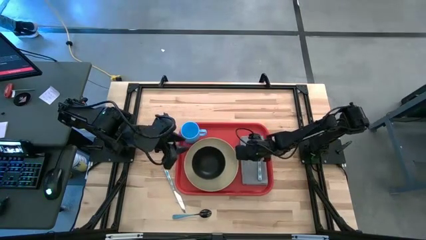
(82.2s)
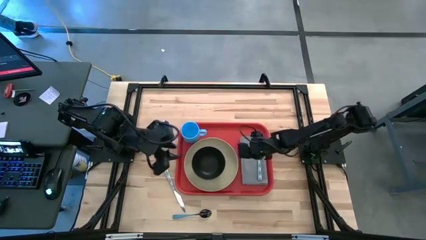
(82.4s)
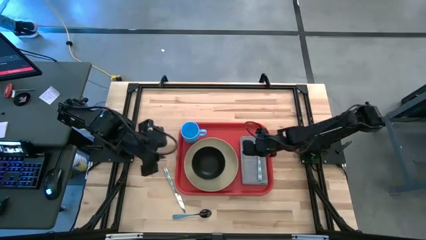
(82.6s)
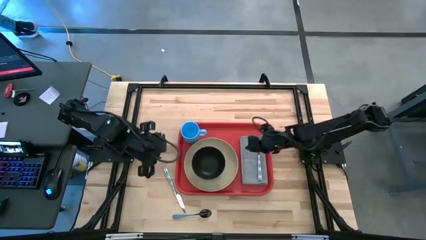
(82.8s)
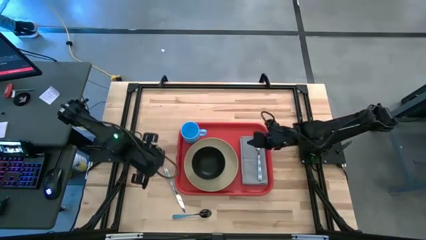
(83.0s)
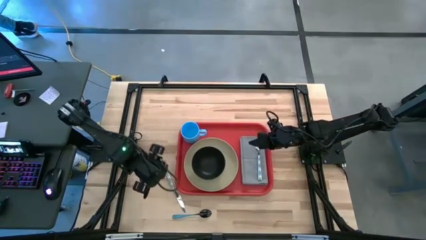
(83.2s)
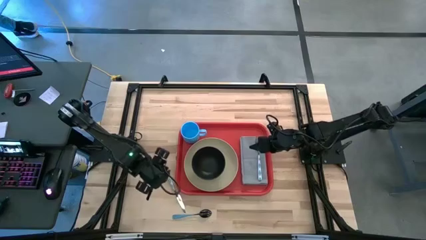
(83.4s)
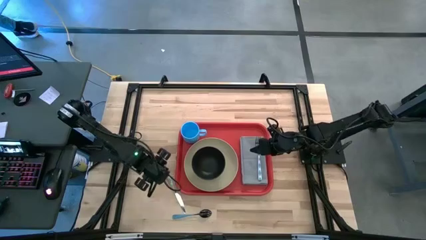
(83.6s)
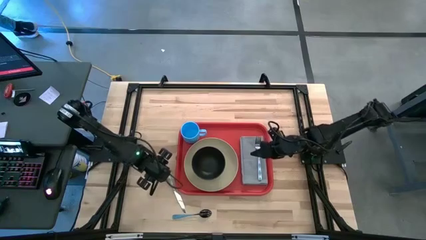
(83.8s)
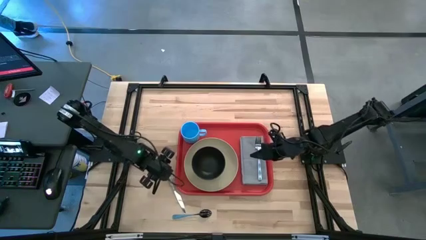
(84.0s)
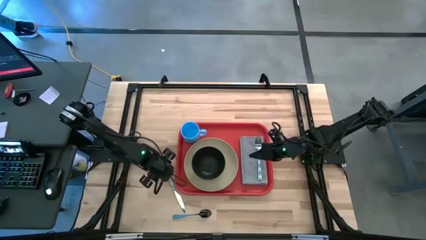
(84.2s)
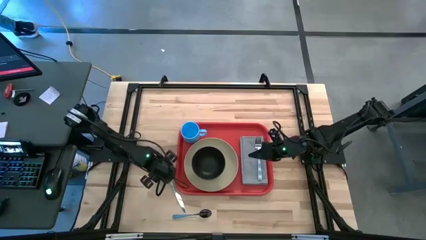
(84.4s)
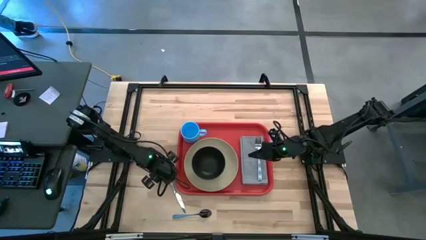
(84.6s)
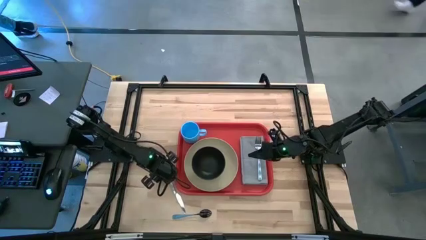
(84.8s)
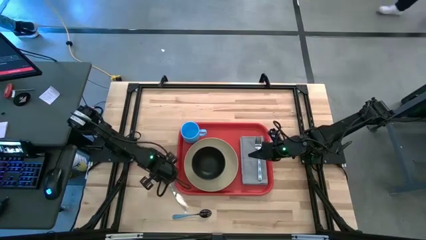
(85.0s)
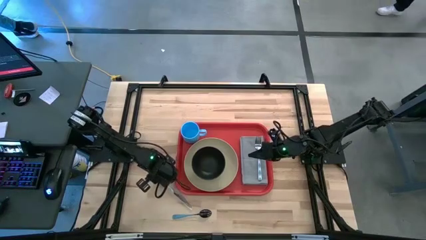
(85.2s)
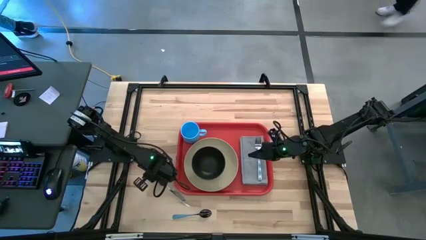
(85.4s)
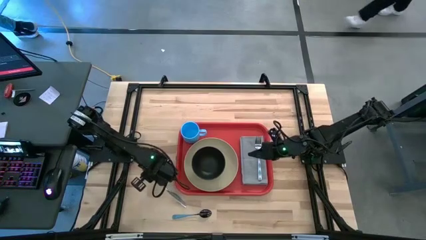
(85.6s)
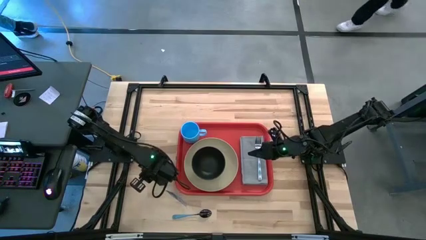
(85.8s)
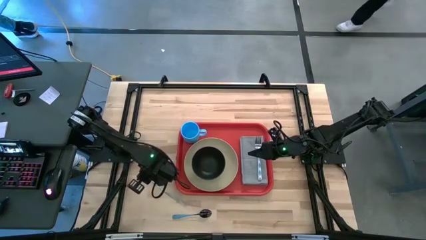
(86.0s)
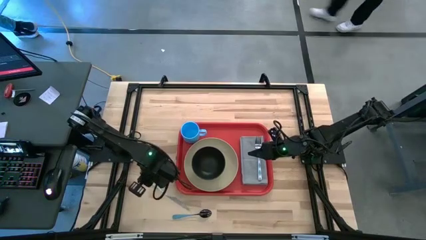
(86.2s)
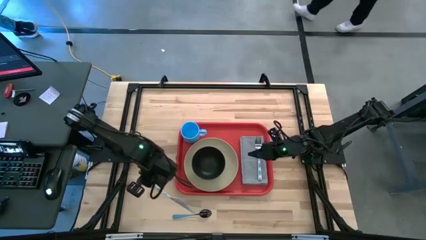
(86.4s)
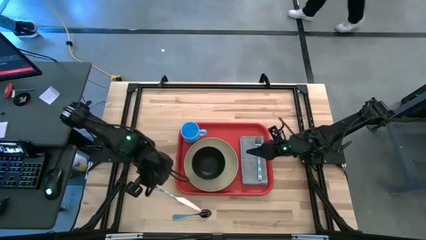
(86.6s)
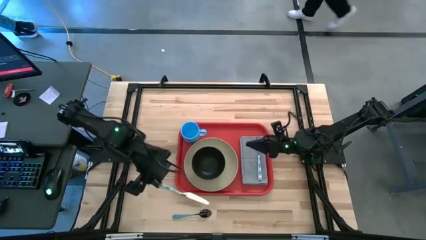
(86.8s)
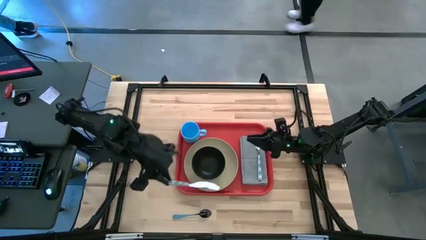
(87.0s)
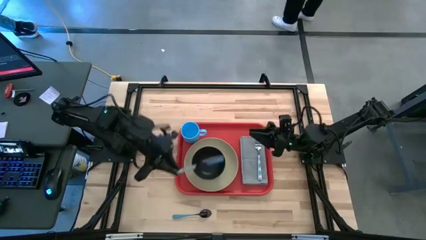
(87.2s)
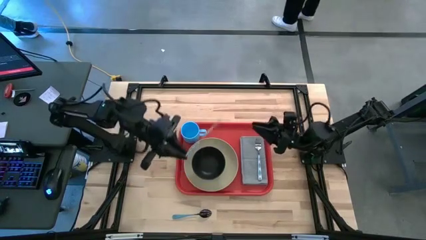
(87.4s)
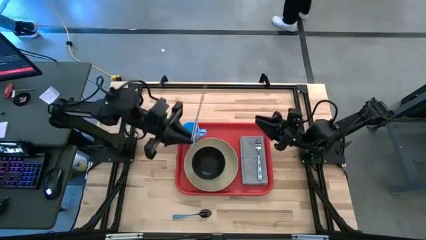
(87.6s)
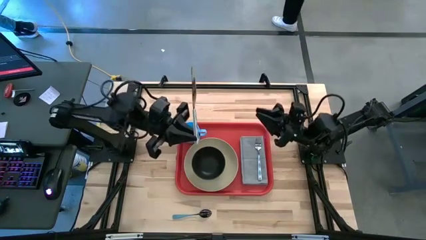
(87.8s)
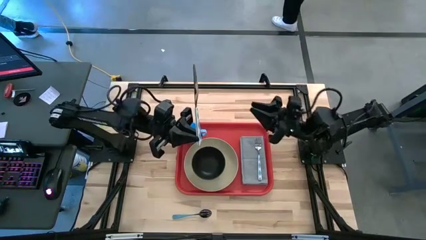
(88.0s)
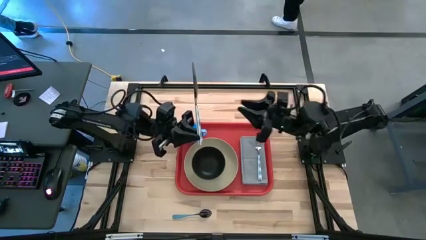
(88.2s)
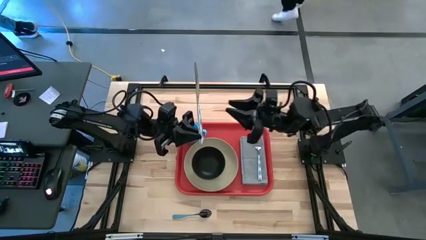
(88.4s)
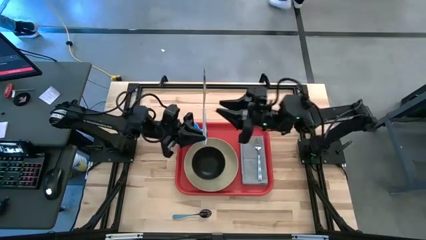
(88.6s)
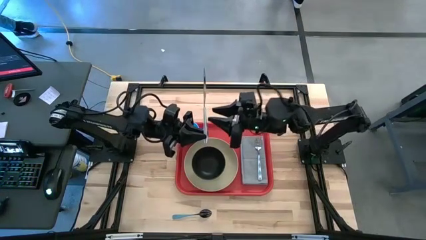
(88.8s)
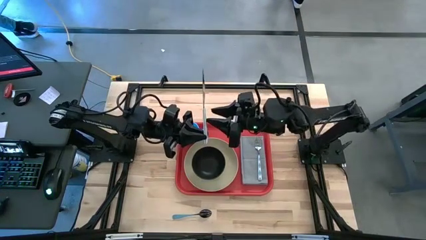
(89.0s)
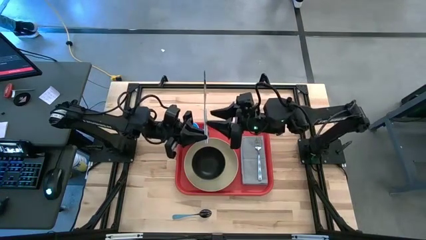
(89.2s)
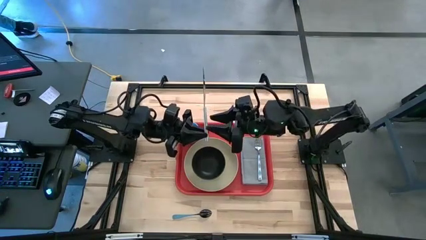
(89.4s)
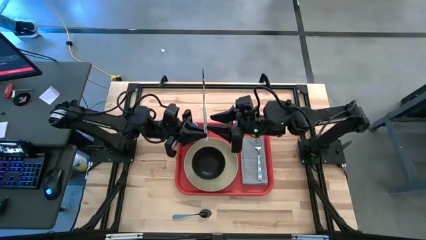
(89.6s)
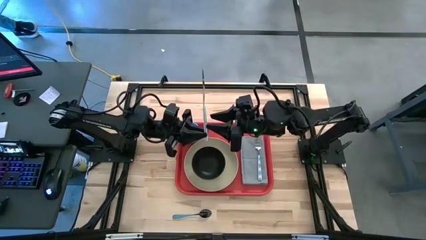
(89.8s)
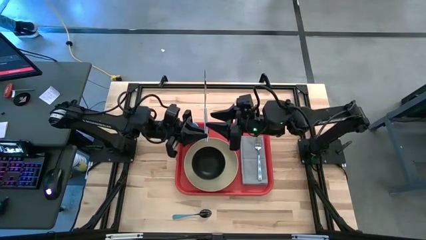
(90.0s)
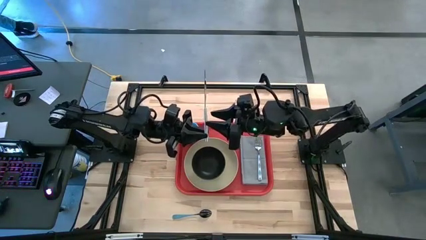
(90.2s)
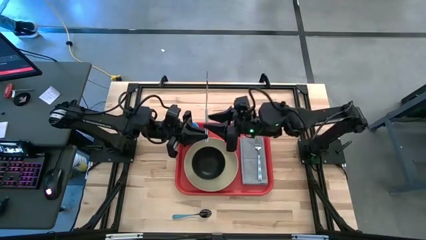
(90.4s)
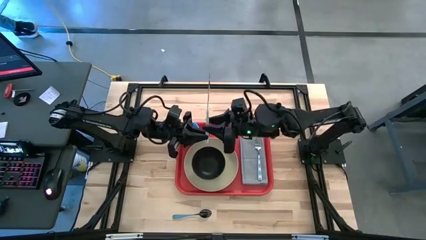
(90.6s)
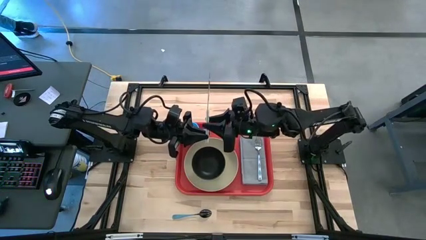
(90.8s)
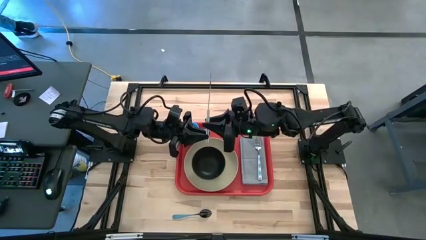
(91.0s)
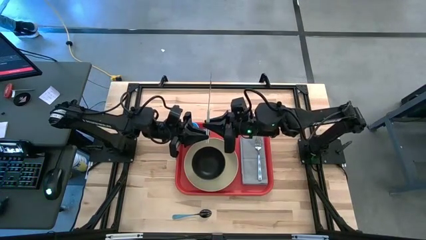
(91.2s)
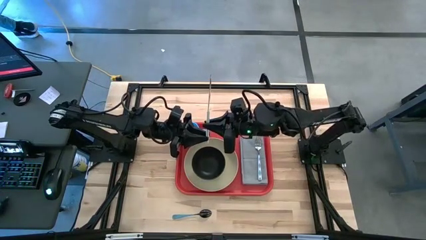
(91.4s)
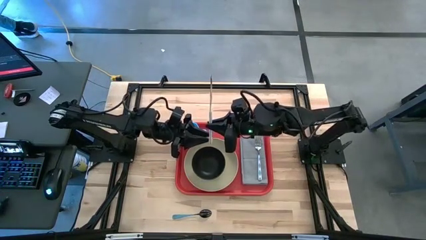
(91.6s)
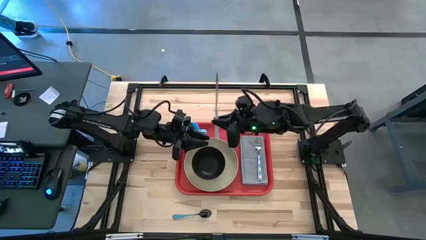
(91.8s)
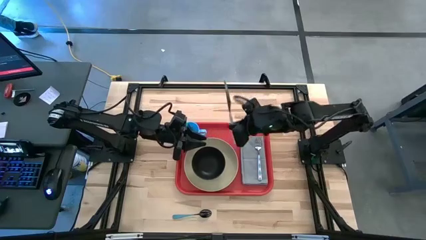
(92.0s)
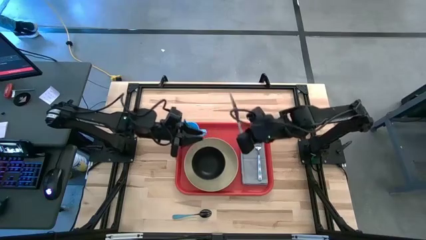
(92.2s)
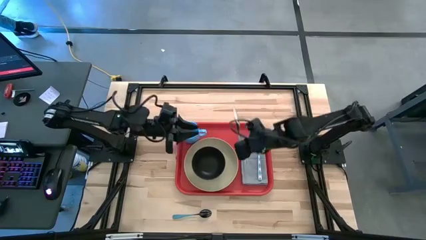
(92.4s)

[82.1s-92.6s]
Task: Set up tray
Put the blue knife on the gray napkin to the left of the blue fork

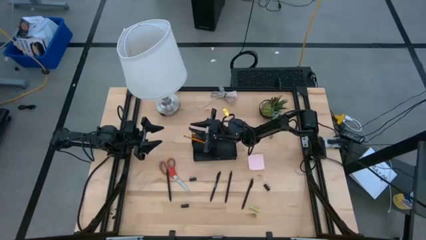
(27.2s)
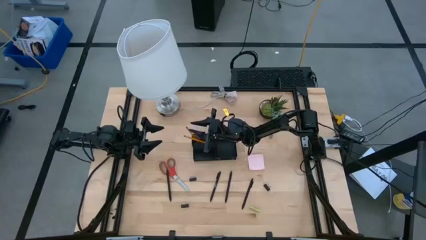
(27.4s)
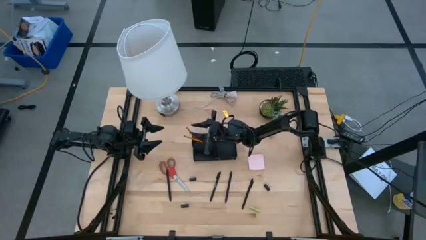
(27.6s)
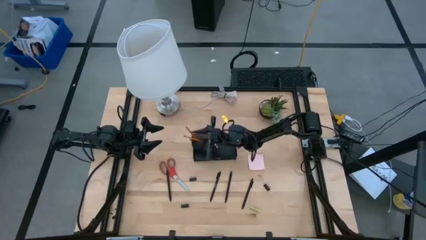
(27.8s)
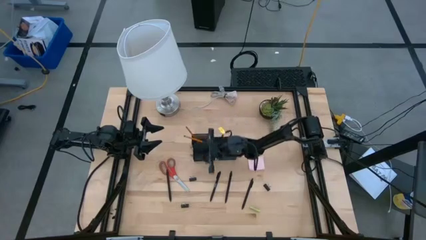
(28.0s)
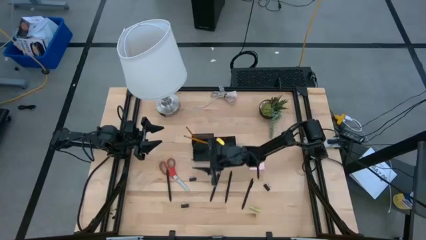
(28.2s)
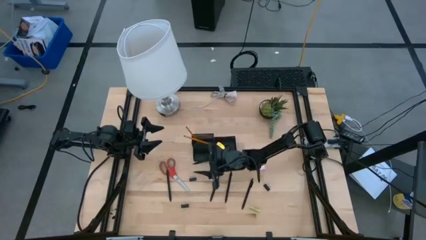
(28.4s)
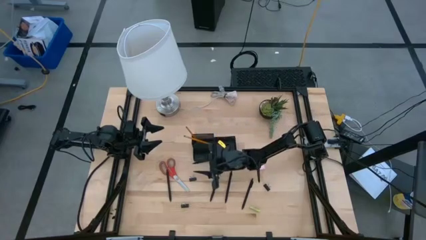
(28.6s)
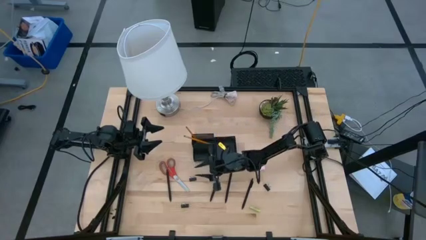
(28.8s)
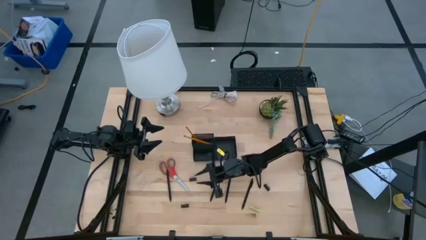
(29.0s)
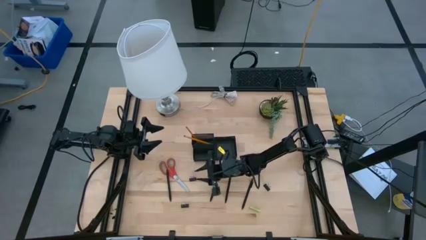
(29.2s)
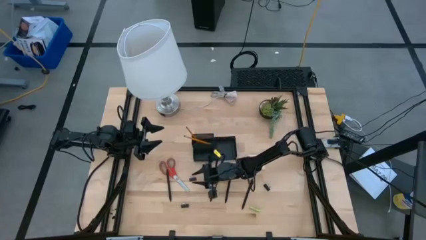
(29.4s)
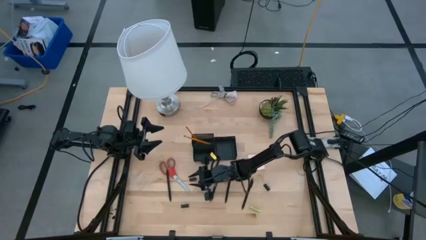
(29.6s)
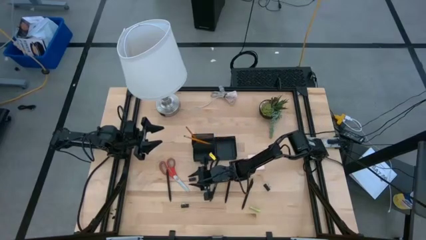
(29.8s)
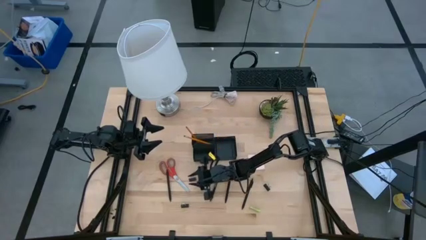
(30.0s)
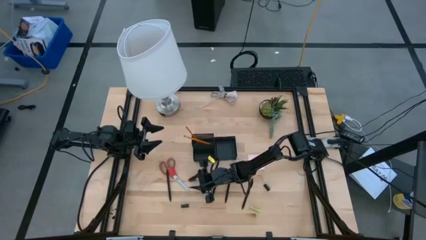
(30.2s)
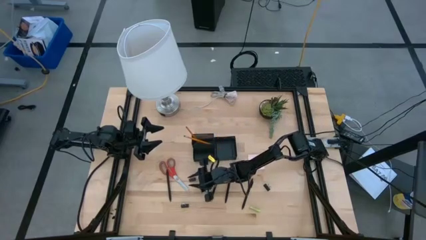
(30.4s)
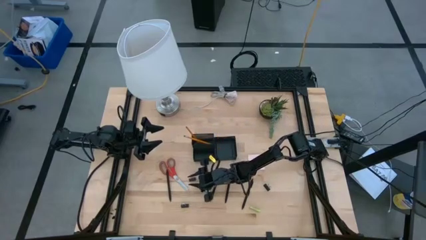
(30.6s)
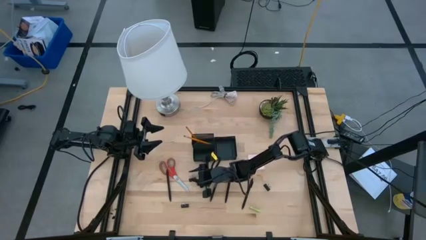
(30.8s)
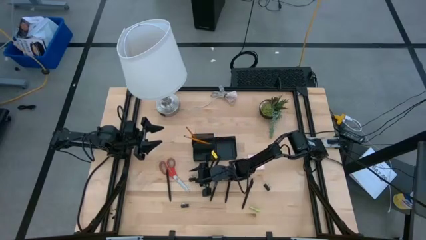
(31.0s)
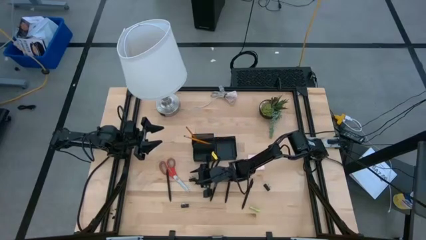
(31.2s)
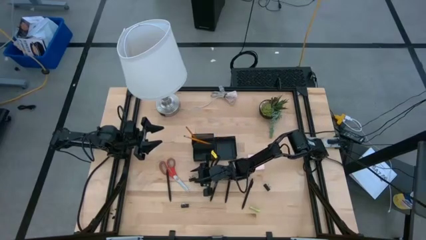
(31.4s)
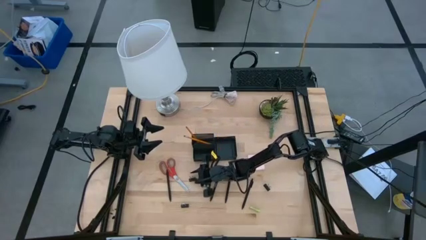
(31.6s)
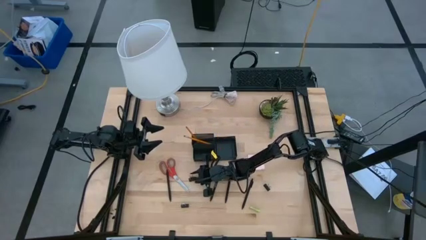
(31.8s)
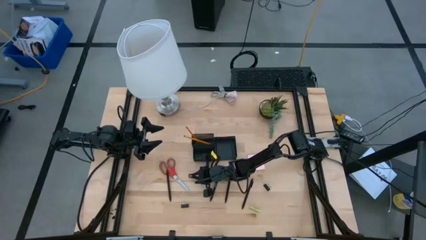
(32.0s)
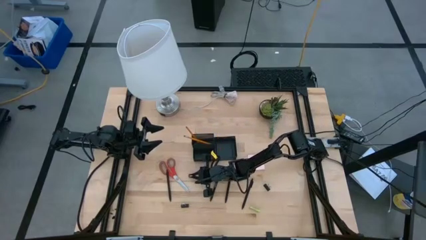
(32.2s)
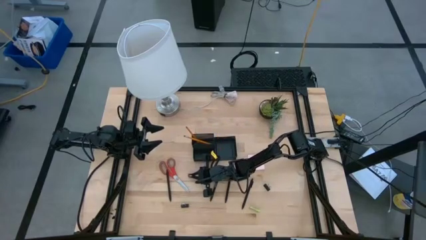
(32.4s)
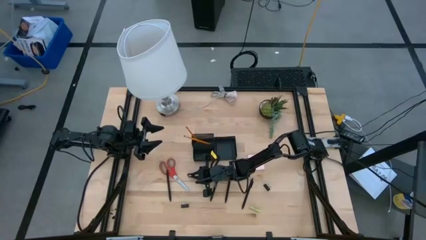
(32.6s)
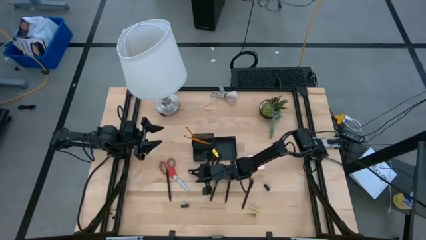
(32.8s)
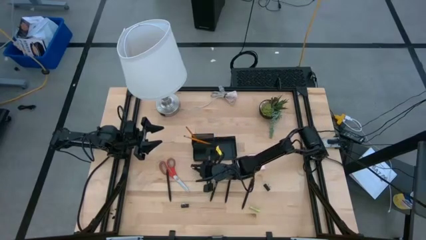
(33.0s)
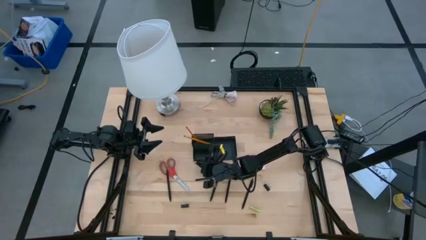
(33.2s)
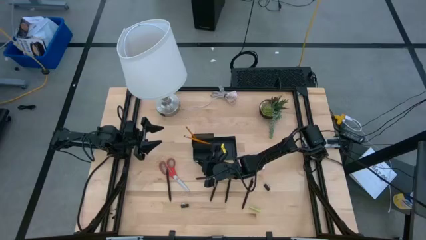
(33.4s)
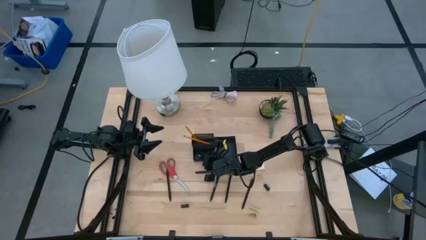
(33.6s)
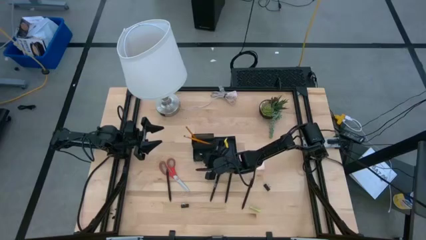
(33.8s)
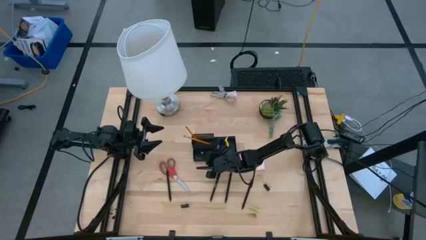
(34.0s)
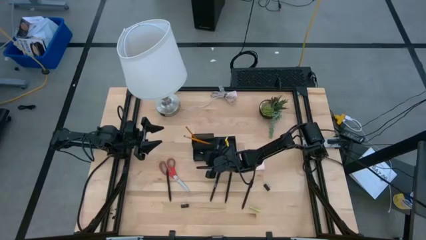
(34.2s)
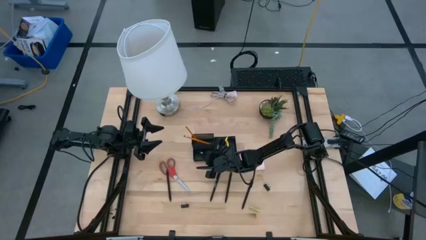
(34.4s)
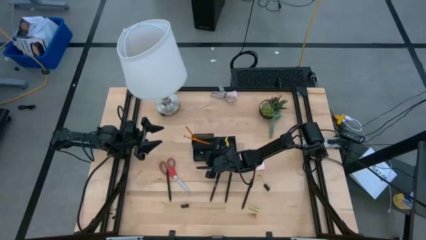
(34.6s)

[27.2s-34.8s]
Task: Pick and place office supplies into organizer
Put the black binder clip into the black desk organizer
